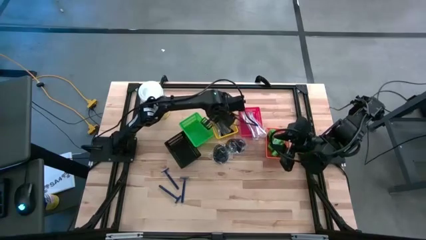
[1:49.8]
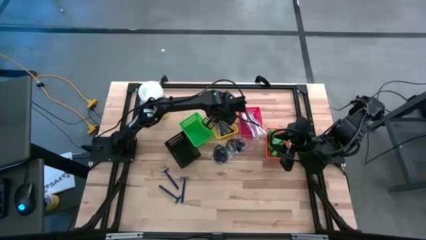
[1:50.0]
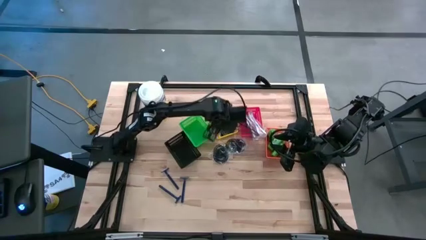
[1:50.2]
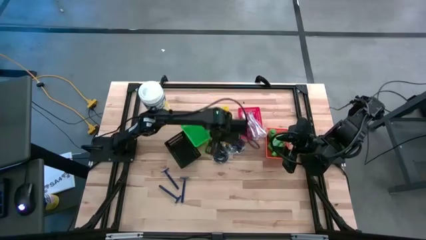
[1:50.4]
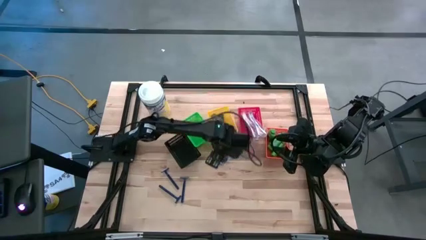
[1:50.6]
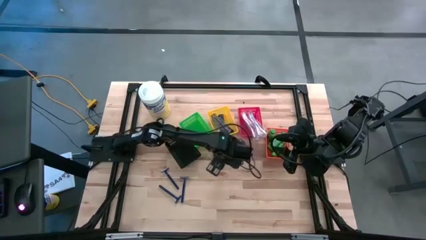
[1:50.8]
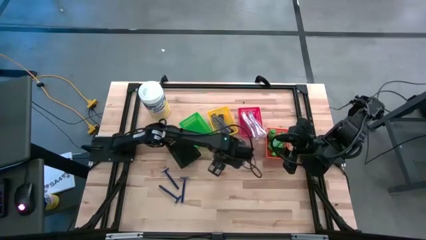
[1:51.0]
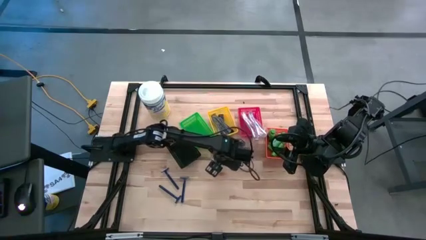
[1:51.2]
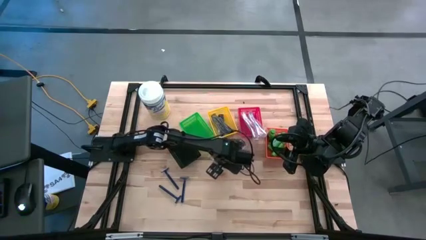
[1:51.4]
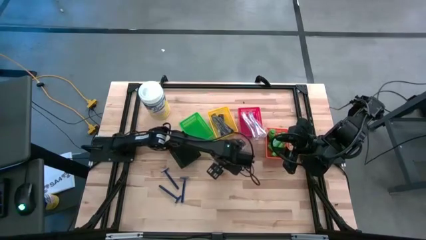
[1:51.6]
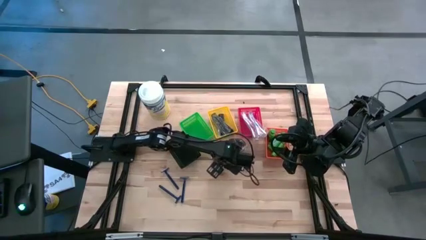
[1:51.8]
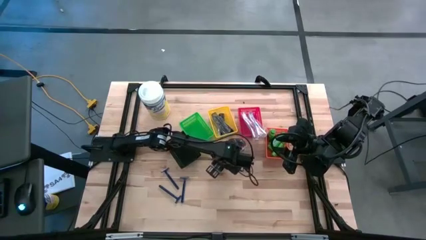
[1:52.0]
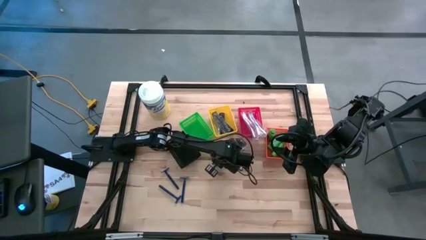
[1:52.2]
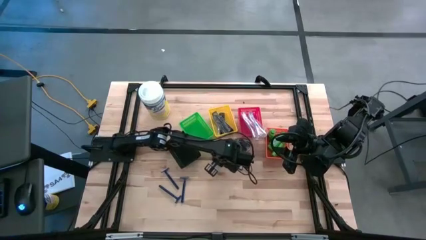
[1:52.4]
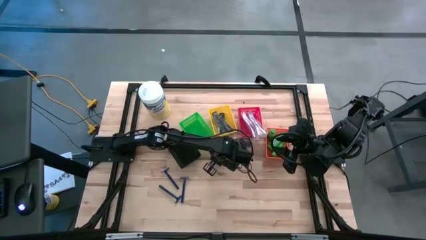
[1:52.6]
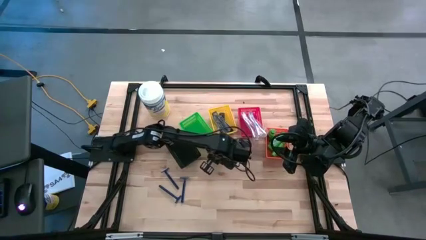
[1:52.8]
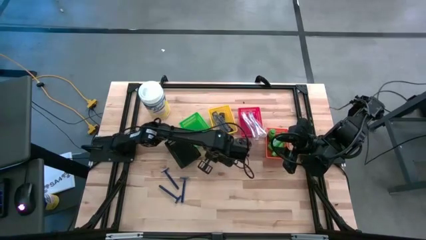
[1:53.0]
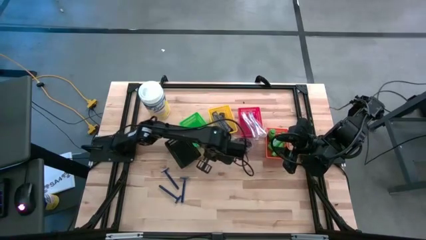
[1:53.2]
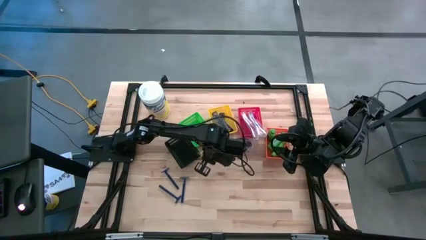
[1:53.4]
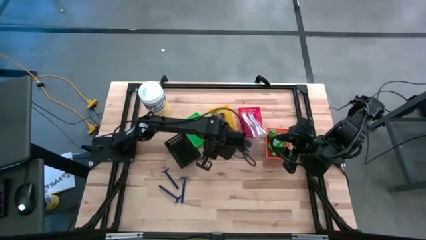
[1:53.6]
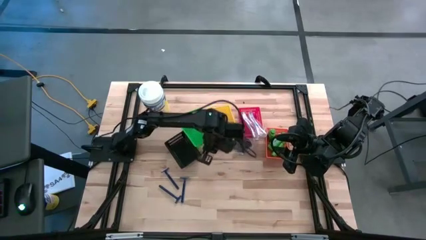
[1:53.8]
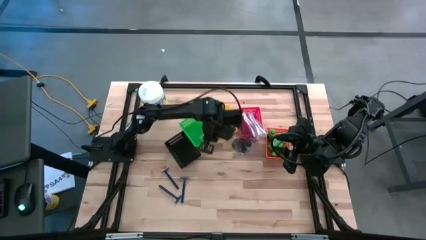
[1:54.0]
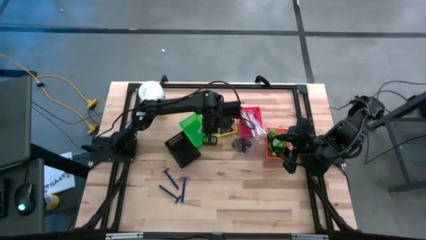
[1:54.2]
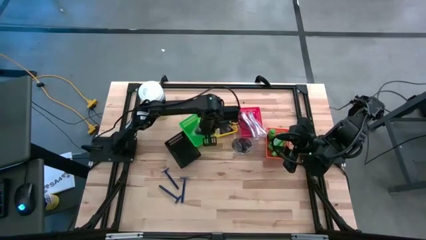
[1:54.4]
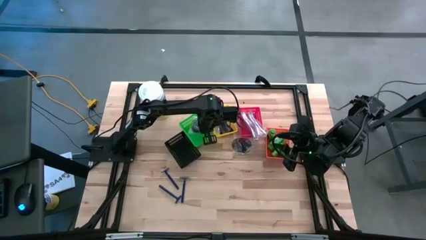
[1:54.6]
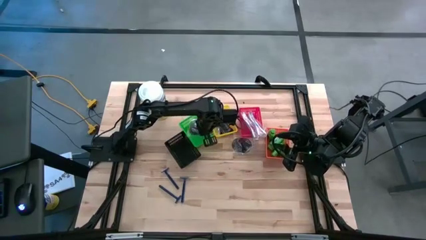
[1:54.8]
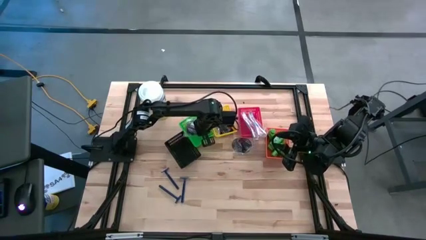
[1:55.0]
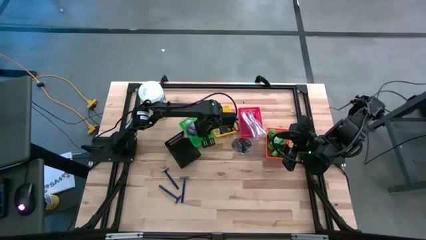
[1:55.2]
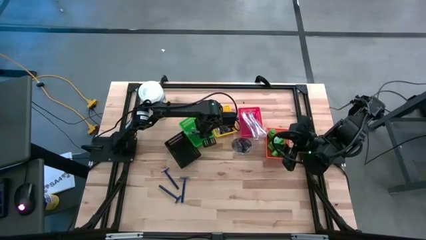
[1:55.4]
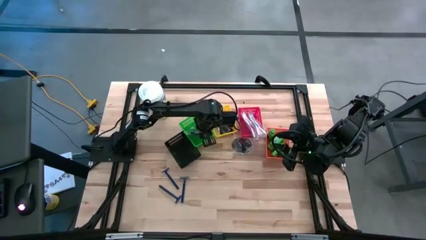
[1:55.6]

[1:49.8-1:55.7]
Task: Pick & Place Travel size toiletries
Put the black hairbrush into the green bin

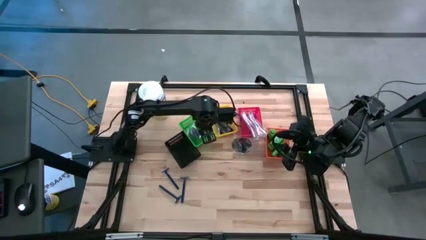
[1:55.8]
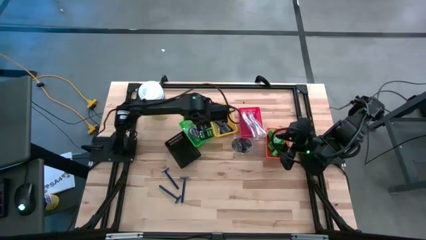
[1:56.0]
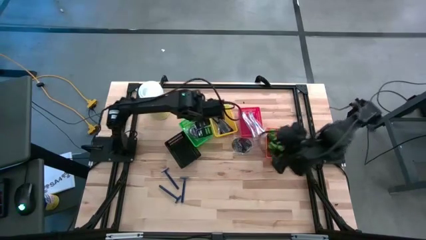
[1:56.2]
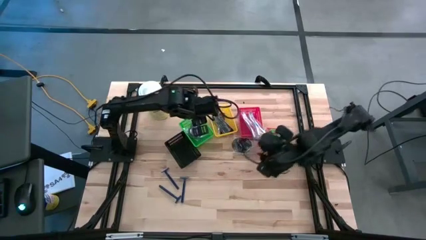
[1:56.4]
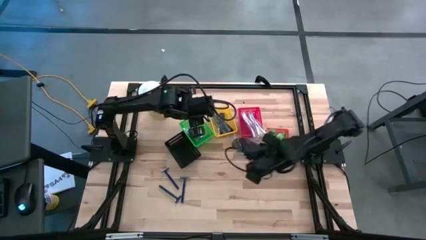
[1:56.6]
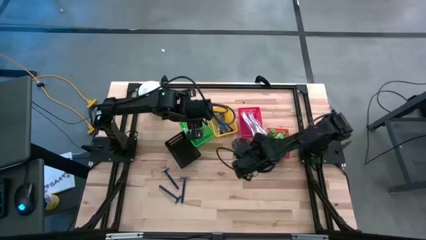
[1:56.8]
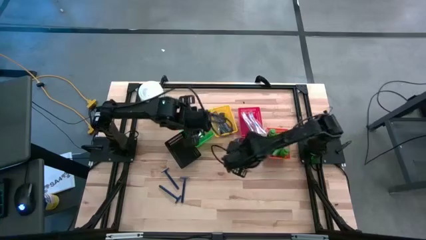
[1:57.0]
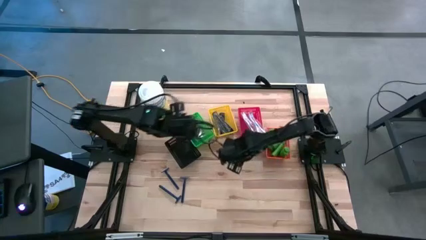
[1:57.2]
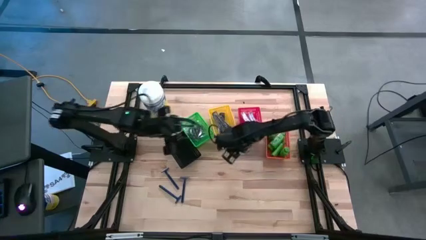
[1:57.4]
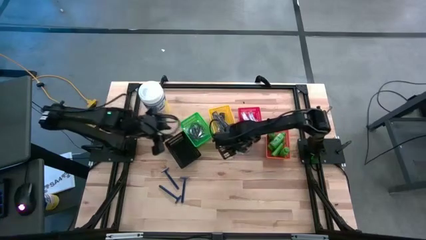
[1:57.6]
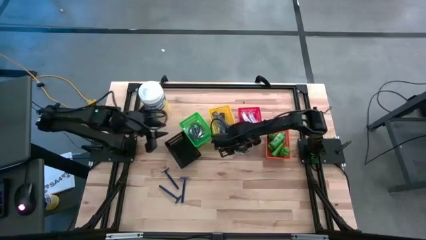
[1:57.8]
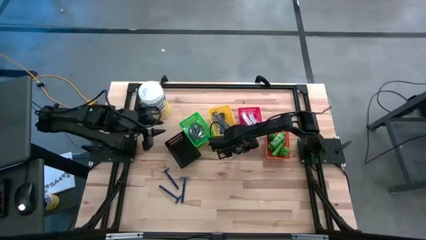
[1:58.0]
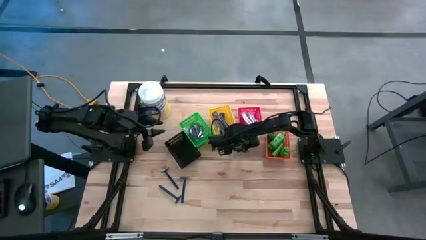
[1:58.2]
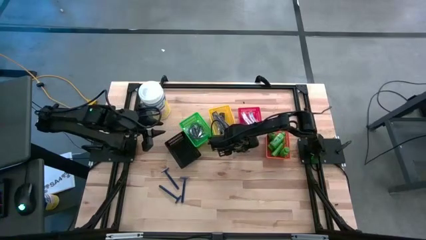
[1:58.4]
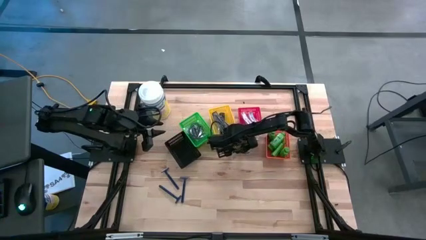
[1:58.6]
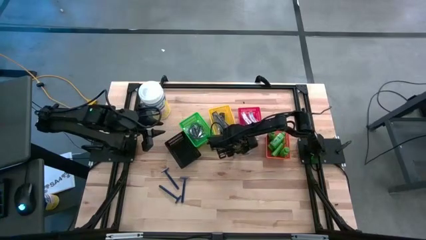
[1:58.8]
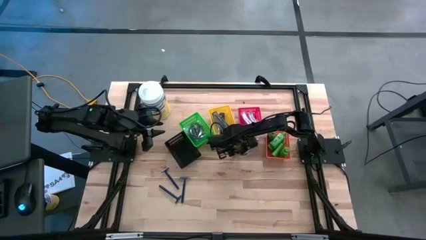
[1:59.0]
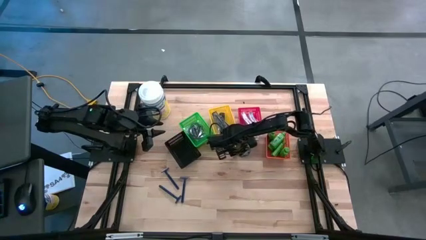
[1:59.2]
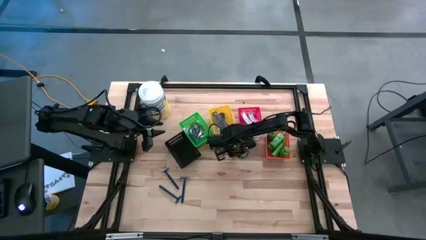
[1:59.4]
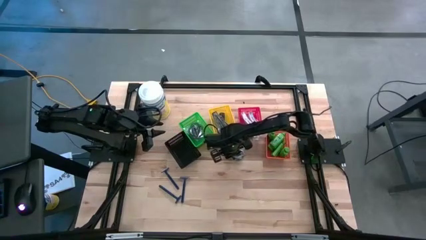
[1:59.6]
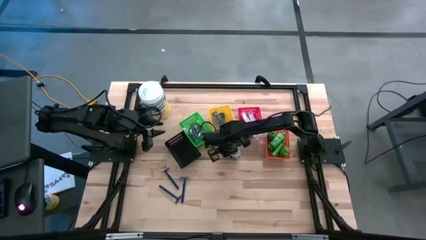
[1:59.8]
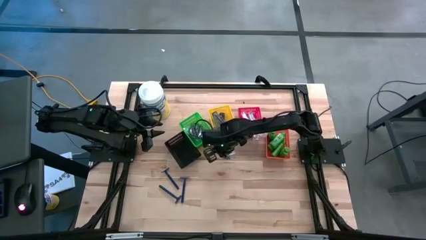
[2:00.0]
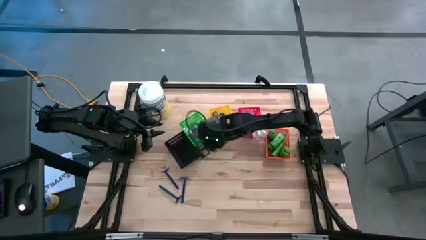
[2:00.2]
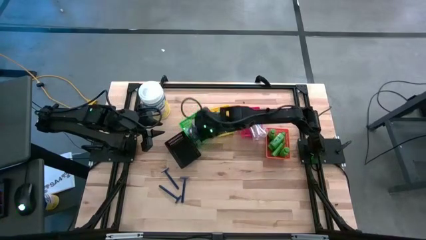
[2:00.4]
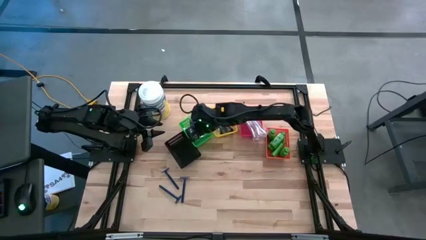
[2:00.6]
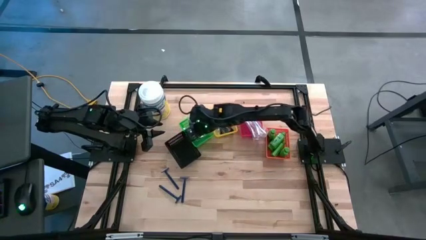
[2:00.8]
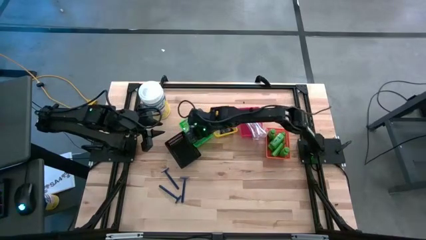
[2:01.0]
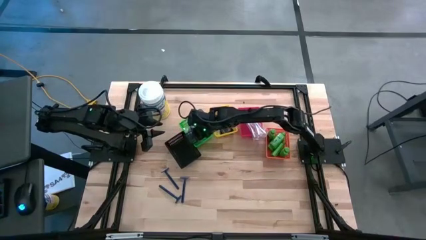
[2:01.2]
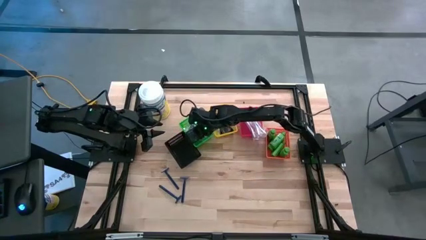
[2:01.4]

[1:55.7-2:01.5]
Put the black hairbrush into the green bin

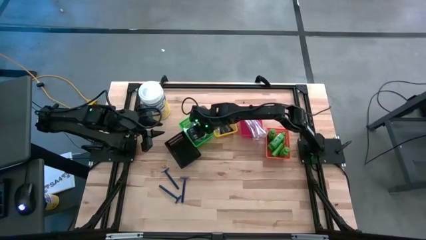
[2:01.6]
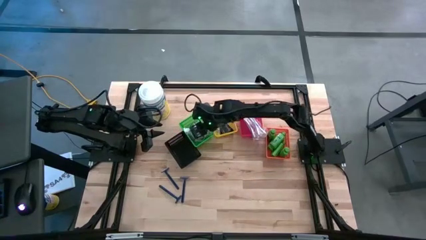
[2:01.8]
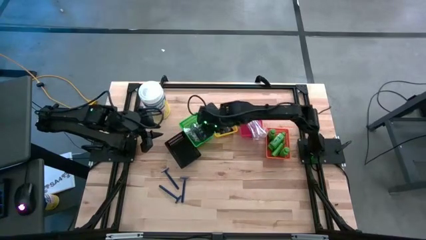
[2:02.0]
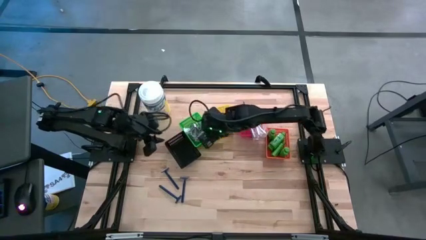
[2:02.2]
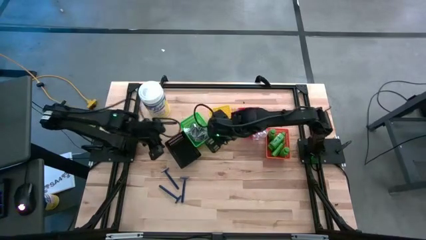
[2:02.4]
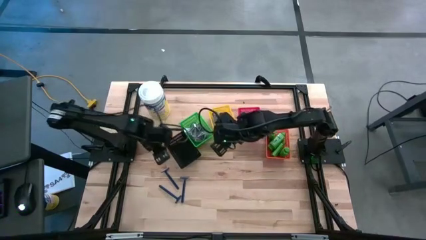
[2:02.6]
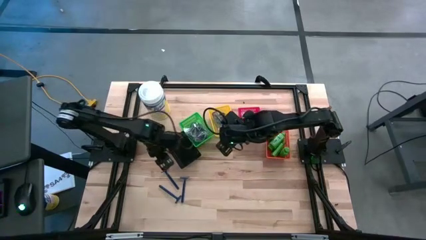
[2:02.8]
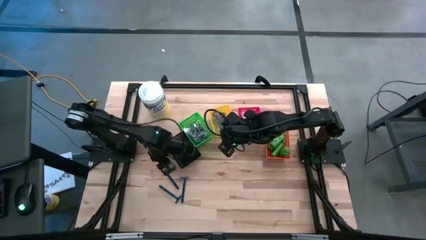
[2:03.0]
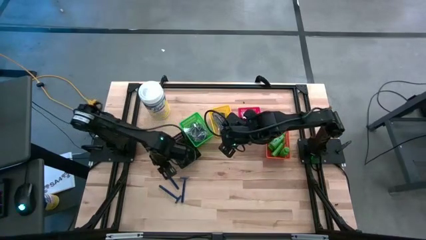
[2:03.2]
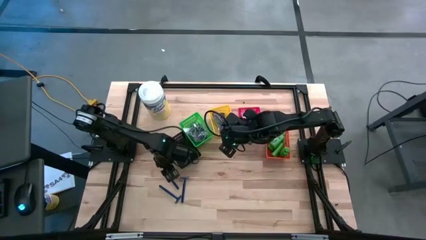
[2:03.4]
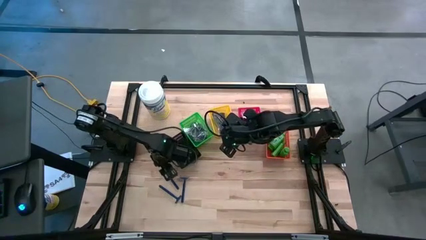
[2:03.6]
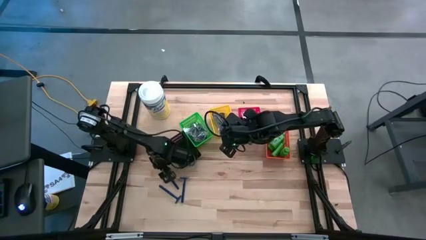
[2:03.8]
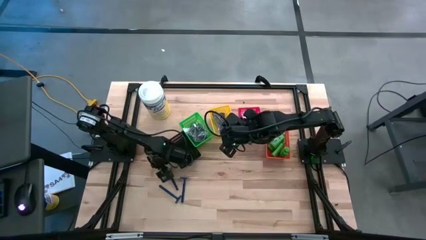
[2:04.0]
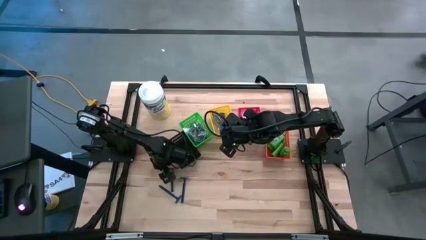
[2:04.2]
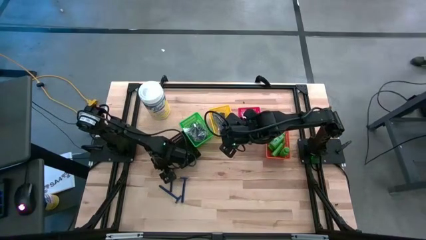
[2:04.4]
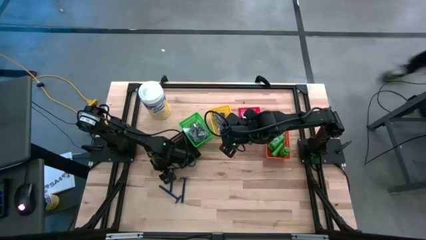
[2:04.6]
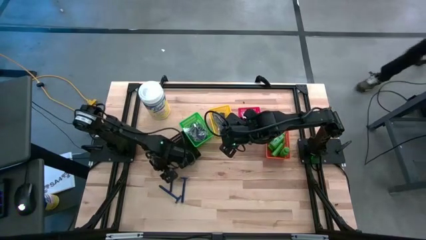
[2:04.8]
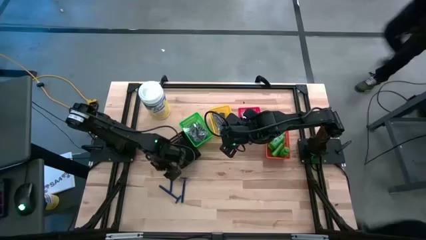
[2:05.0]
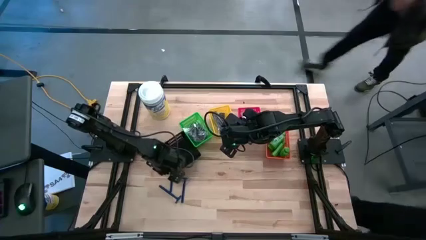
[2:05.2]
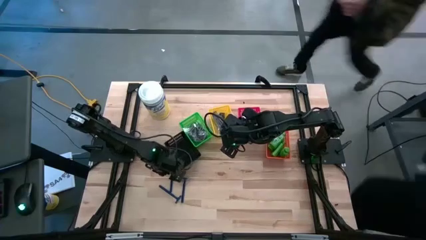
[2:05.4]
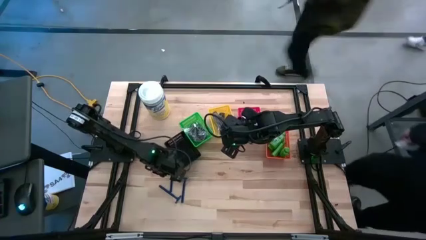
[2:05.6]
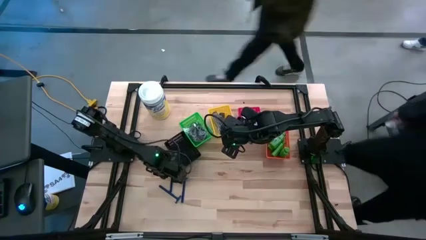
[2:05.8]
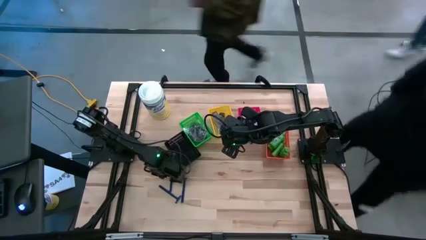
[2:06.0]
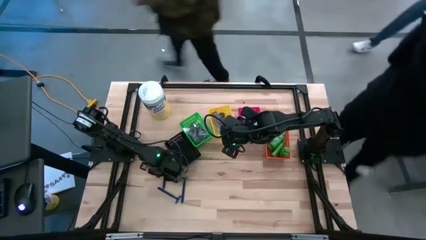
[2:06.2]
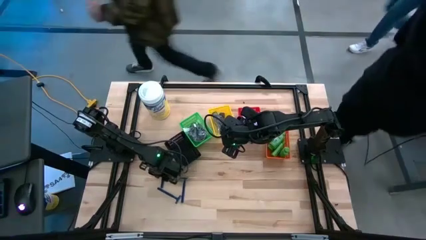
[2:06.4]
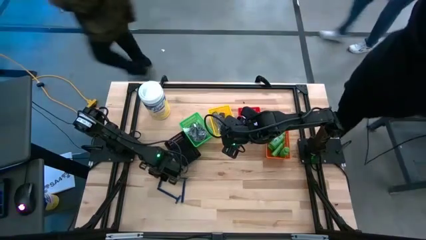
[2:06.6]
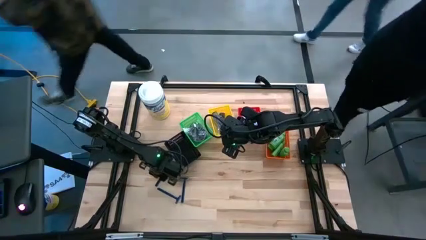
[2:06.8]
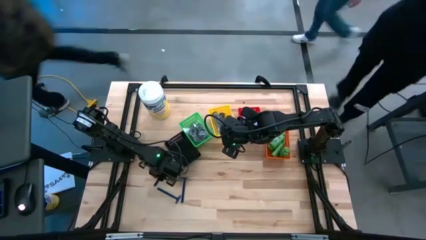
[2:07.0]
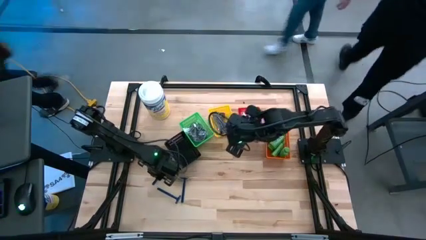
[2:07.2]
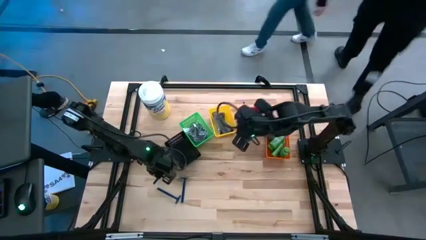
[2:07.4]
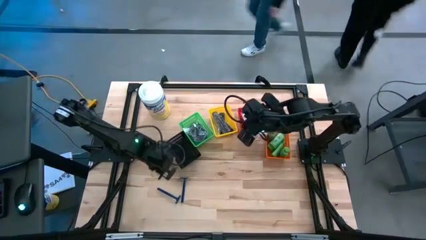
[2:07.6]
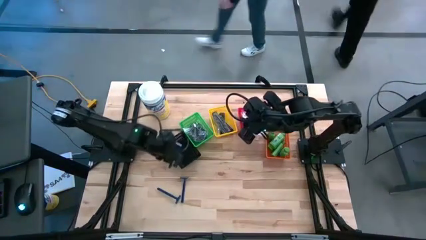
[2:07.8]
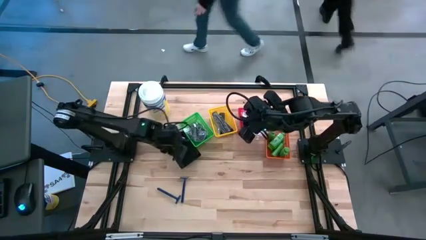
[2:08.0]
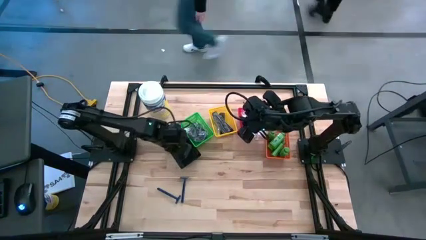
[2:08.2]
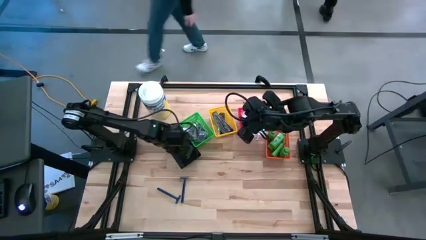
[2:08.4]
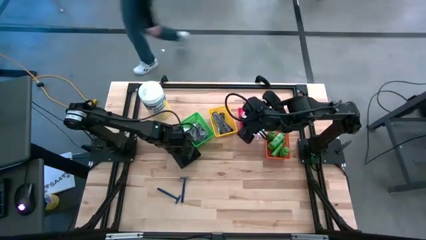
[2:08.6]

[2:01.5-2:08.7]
Put the blue razor into the black bin
